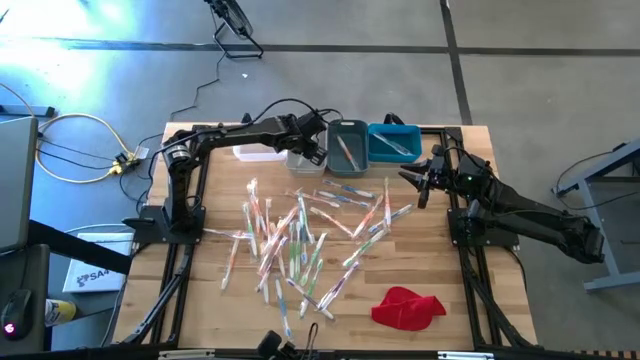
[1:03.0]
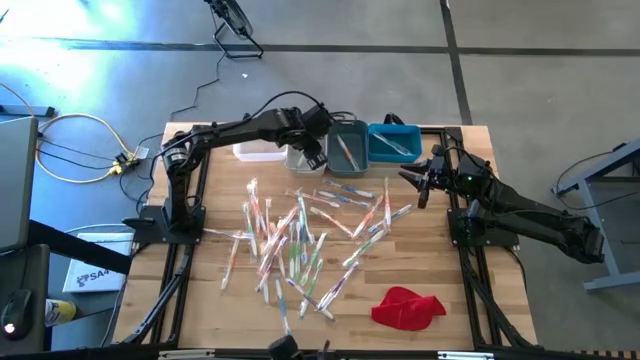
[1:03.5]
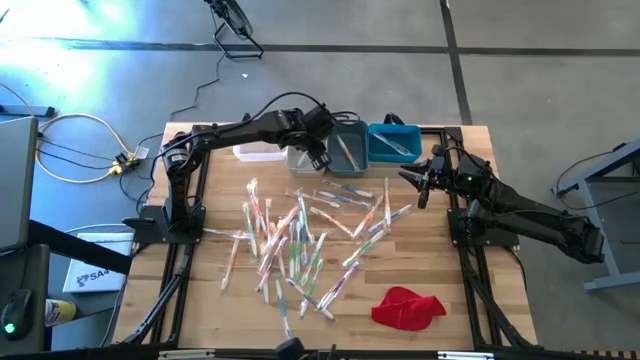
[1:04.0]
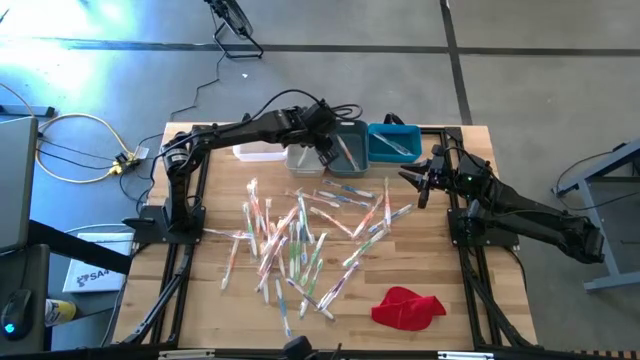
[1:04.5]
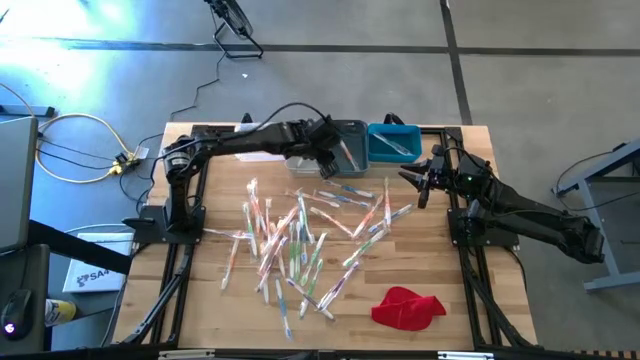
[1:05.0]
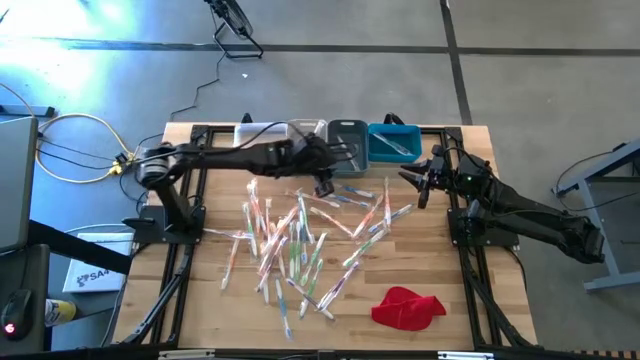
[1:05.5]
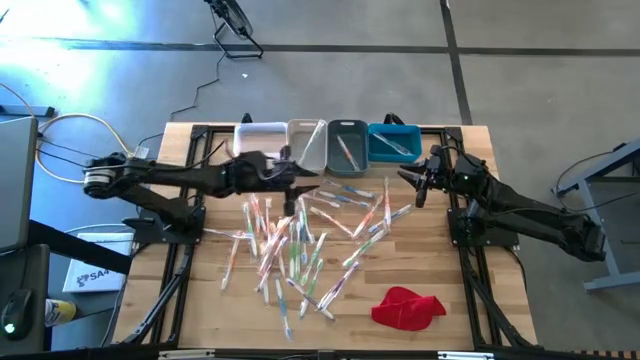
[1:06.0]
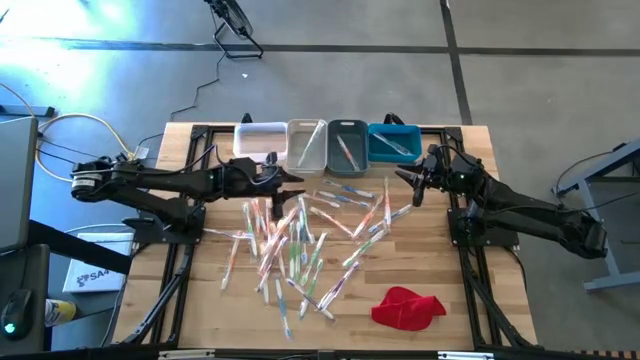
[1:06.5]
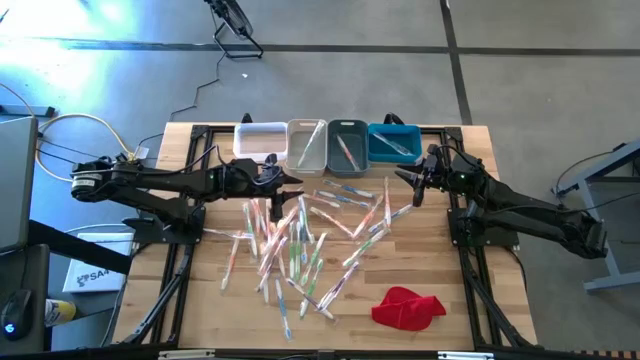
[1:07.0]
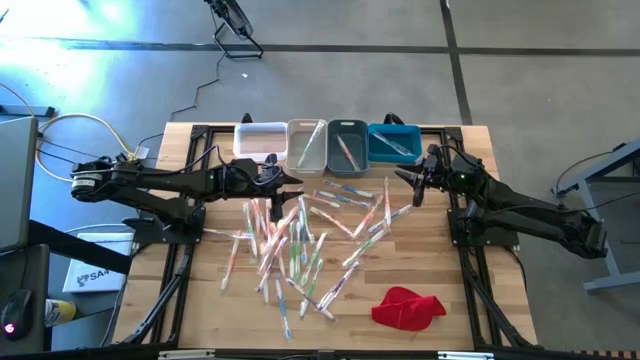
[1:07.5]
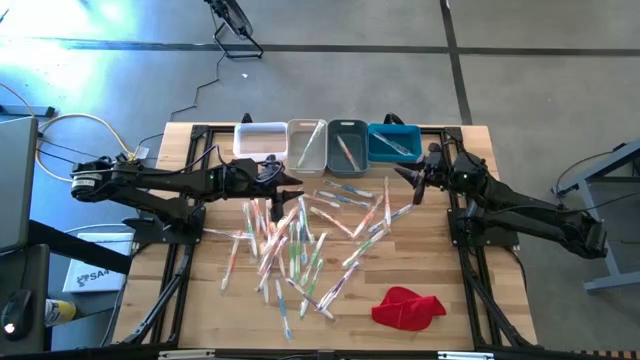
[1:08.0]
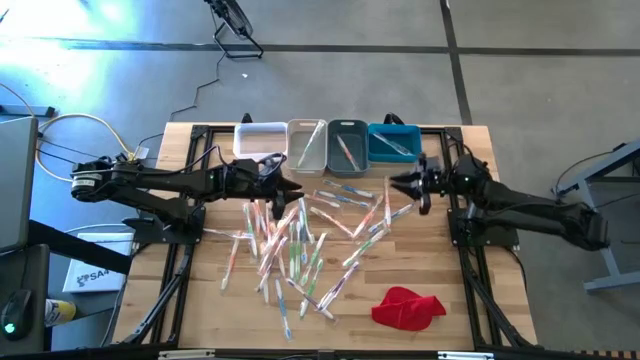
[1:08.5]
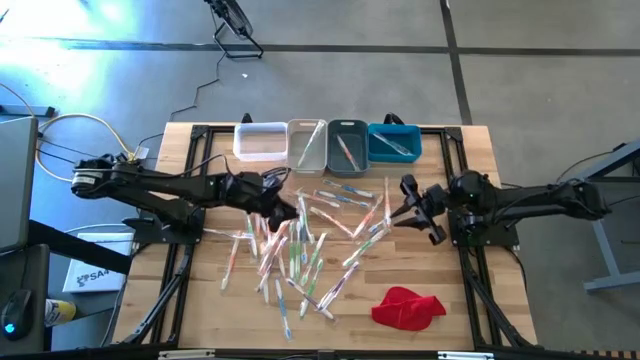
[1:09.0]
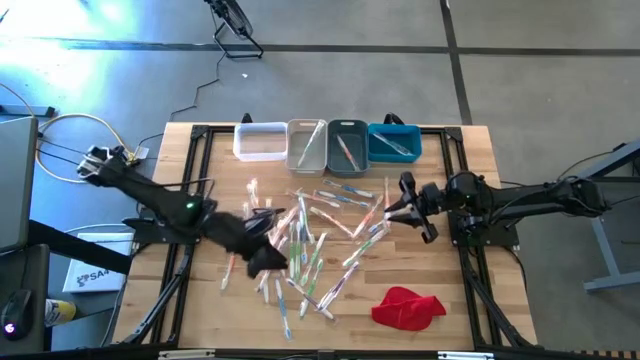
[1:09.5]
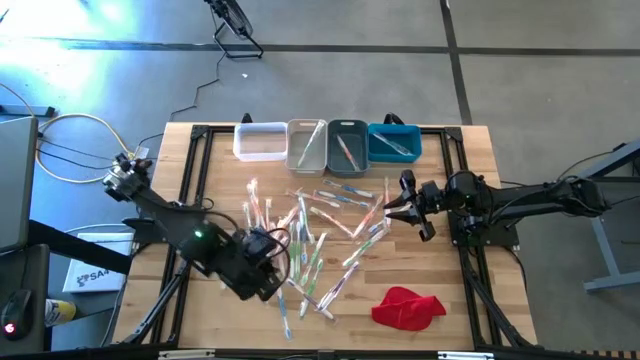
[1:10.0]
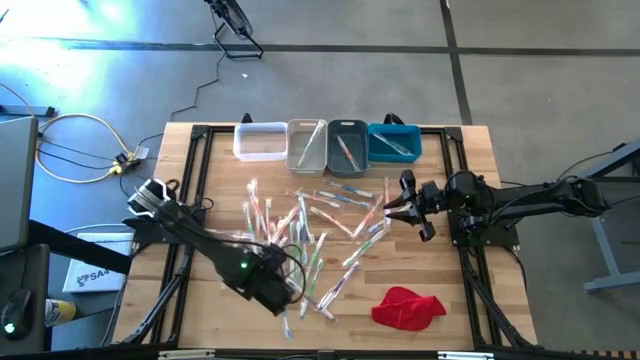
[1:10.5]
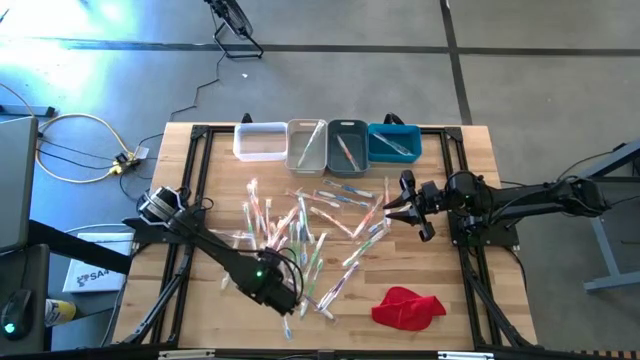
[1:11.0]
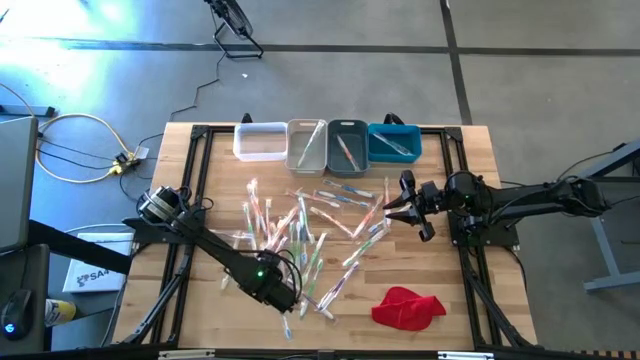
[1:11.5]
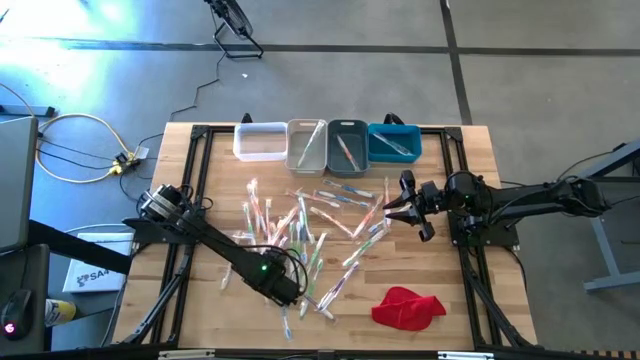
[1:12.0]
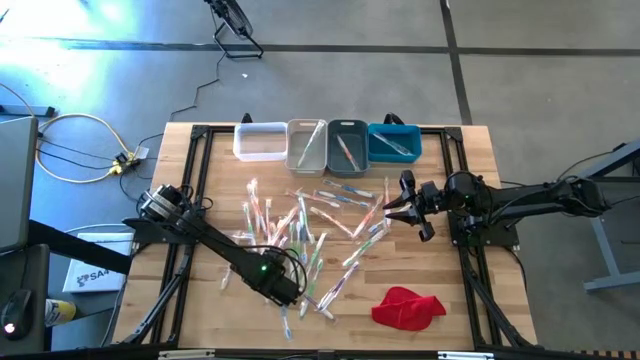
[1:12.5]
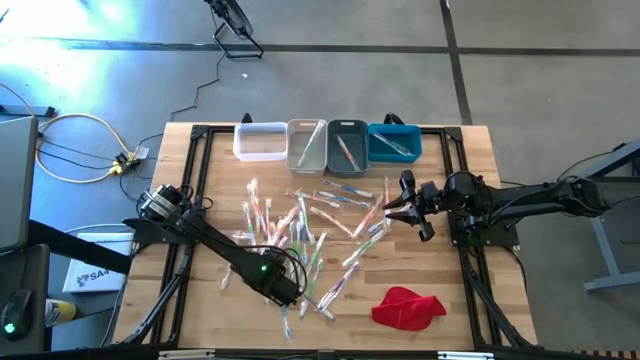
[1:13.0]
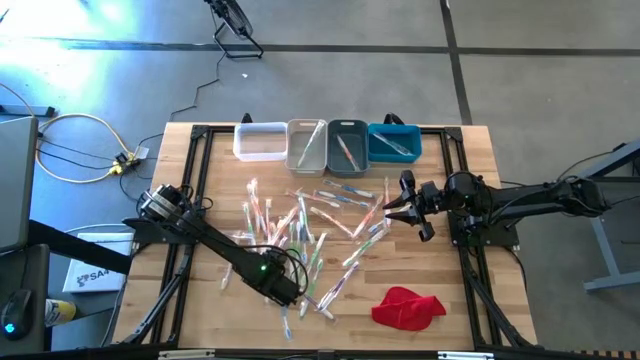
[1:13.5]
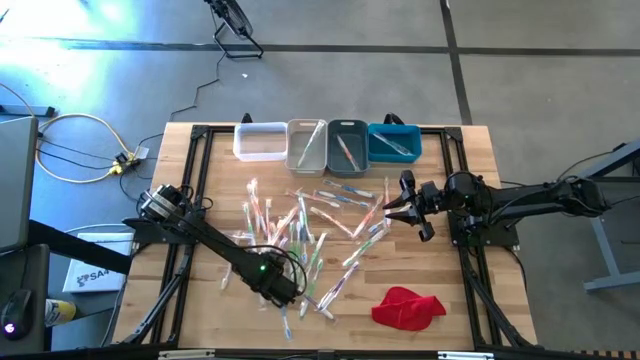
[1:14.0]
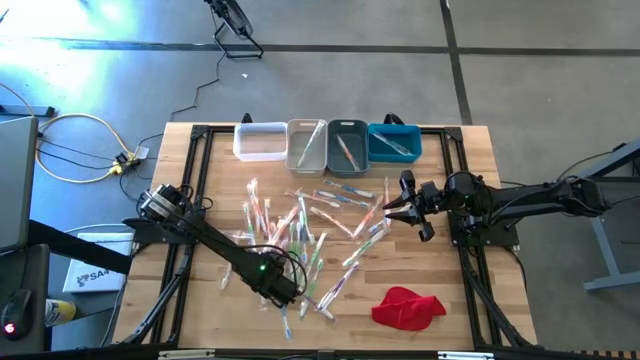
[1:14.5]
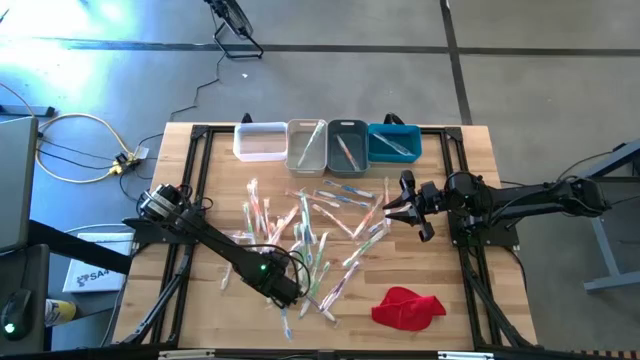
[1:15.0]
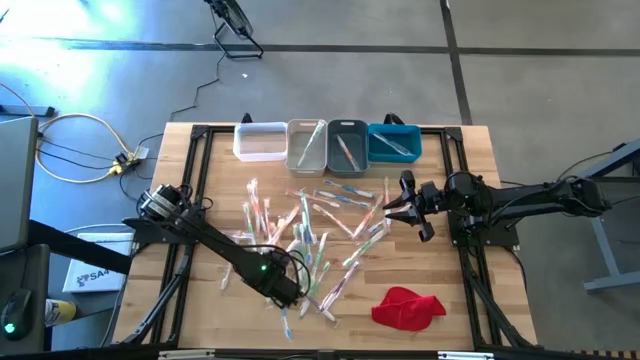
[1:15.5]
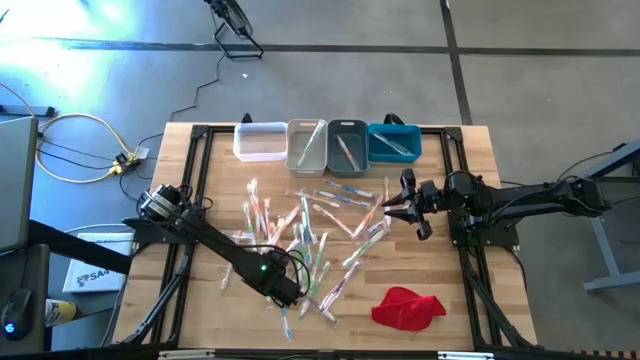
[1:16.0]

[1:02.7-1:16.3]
Task: Pick & Place Toothbrushes
Put the purple toothbrush into the transparent bin

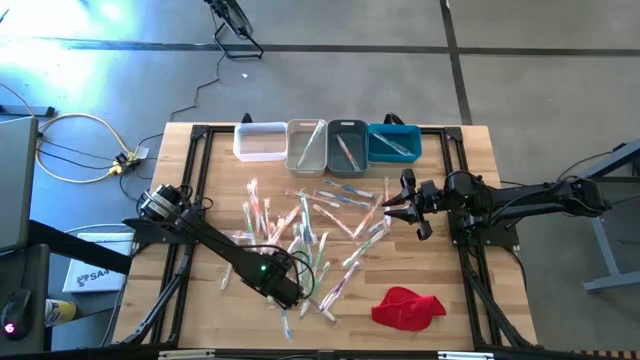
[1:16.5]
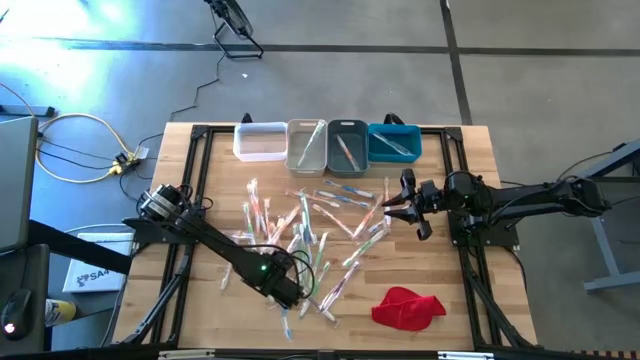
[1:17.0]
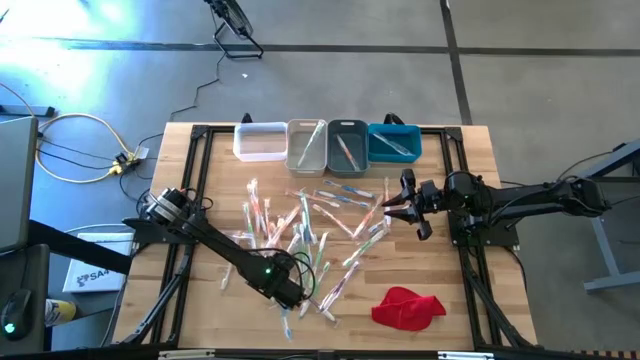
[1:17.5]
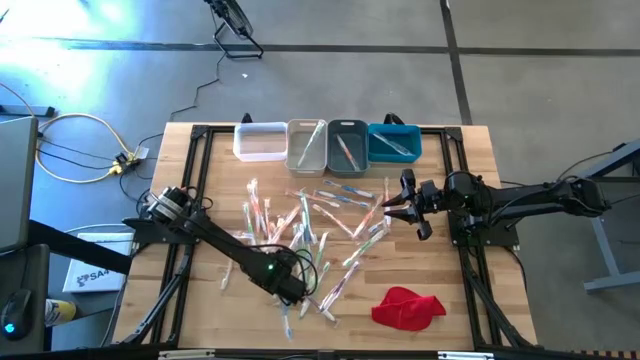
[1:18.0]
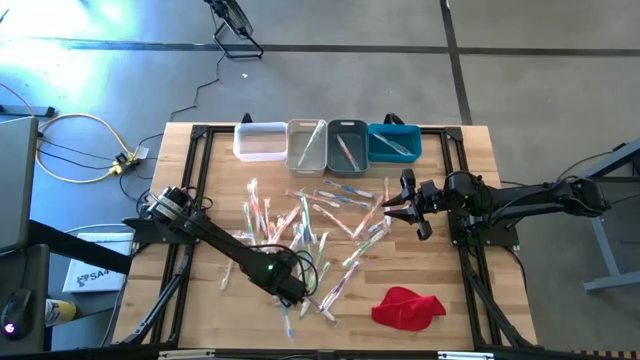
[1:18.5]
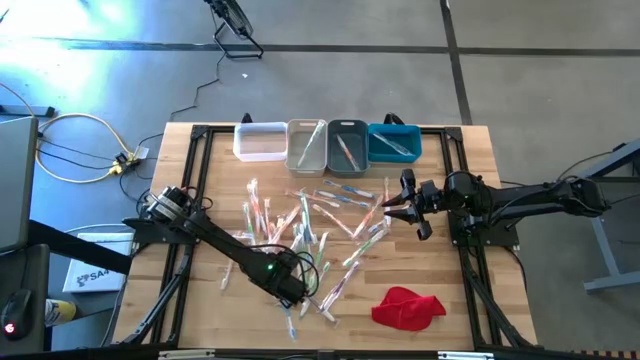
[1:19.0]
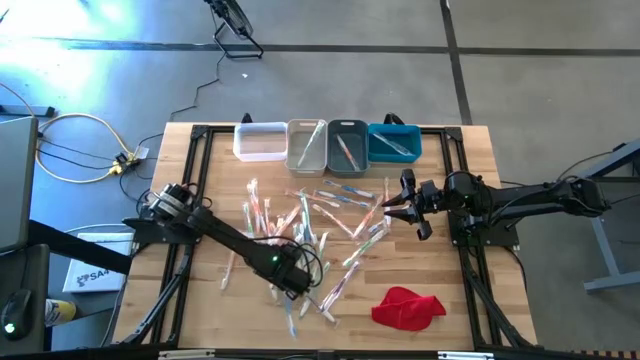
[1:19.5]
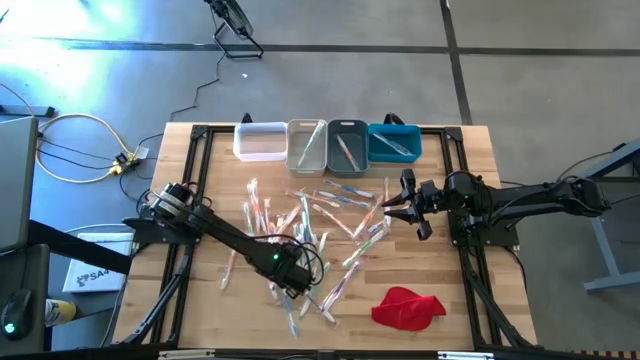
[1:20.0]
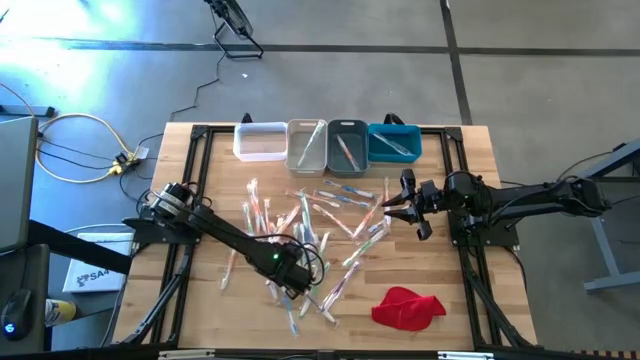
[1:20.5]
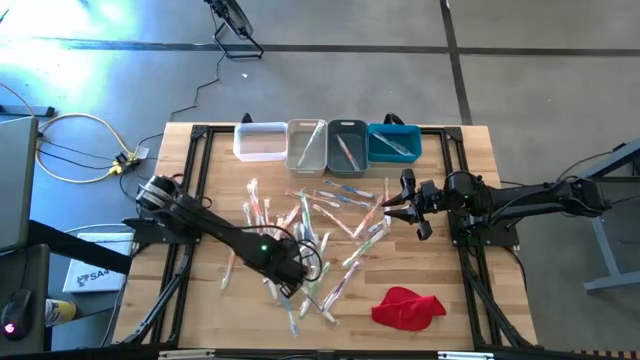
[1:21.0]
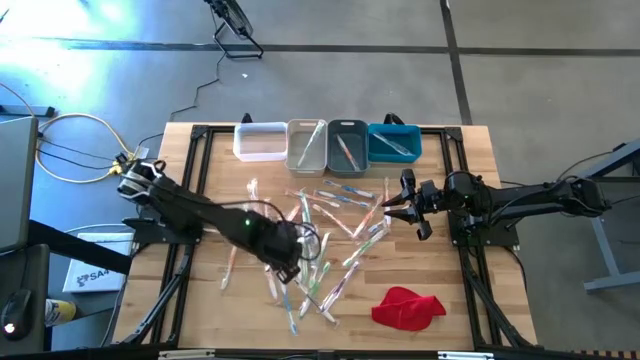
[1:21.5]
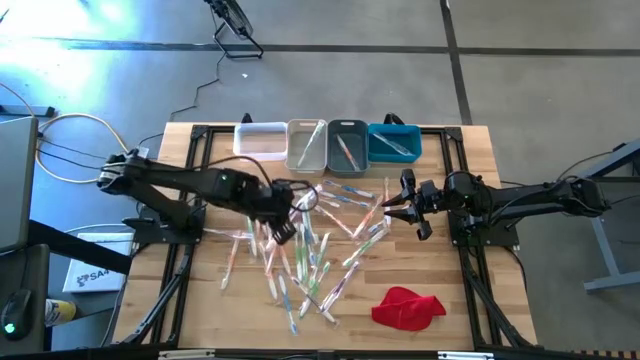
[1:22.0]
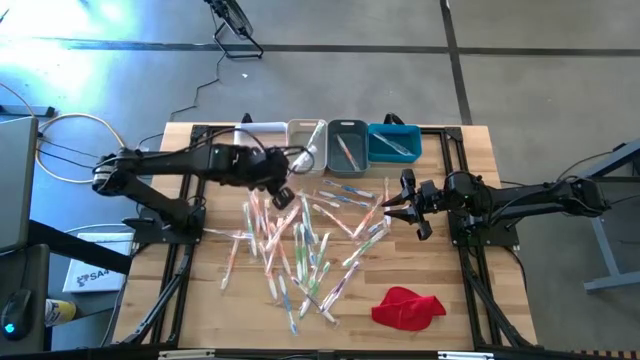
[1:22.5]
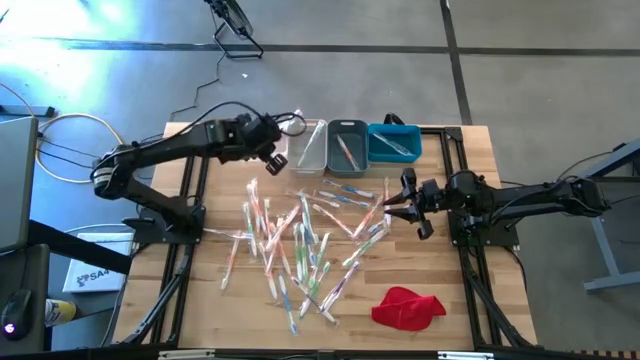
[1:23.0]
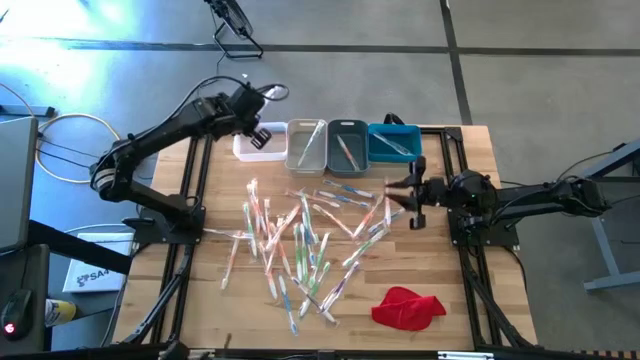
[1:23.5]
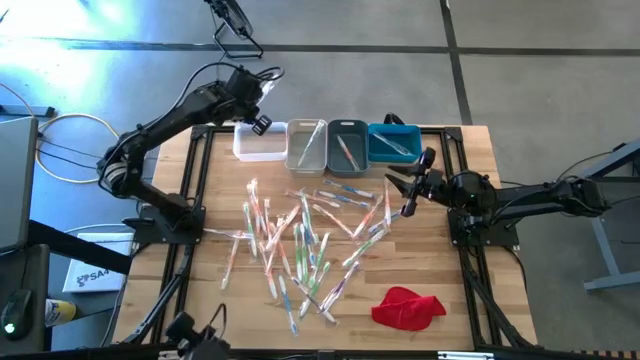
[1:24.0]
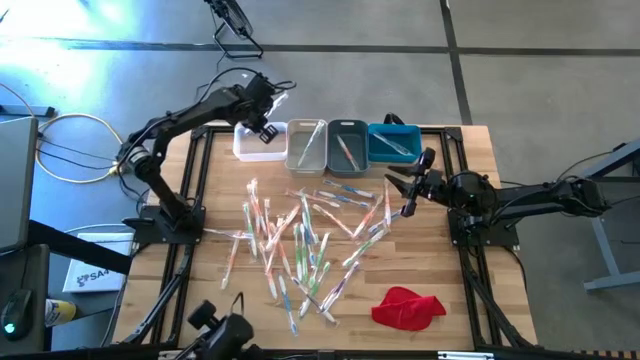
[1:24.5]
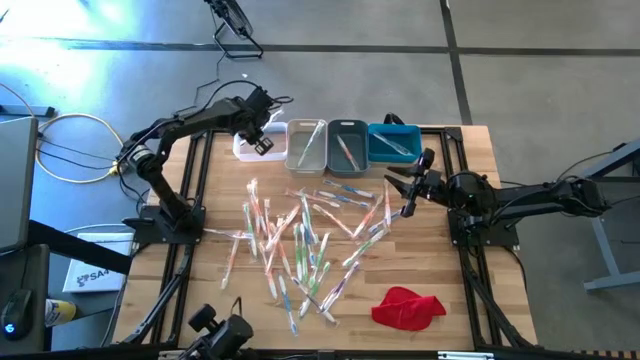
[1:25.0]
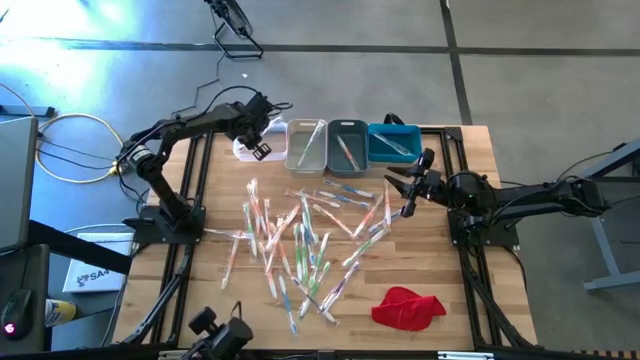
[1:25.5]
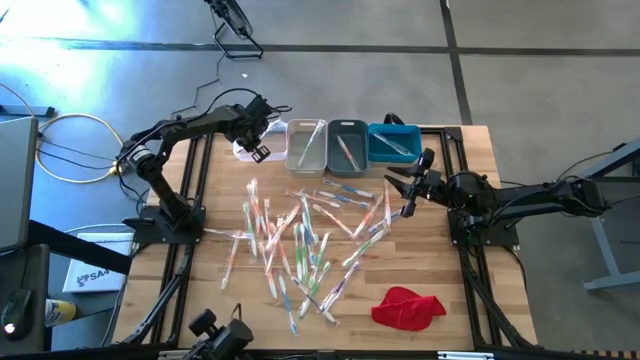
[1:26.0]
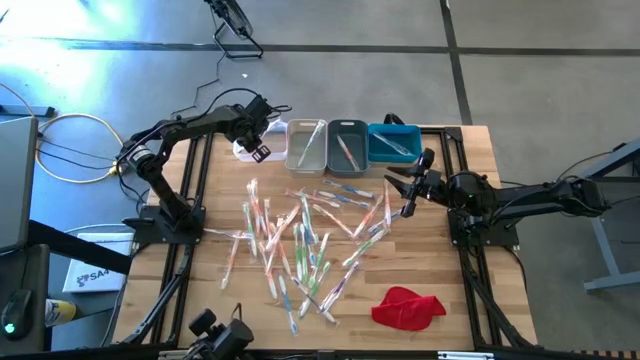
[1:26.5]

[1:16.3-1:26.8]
Put the purple toothbrush into the transparent bin
